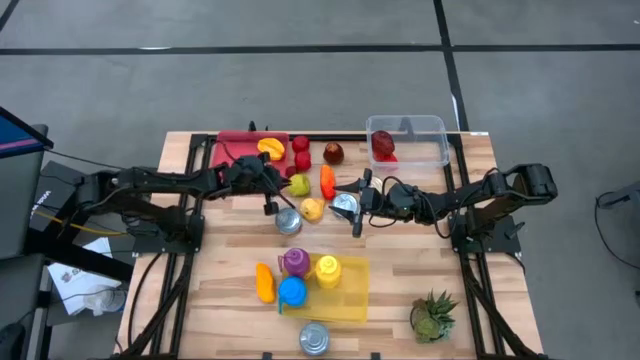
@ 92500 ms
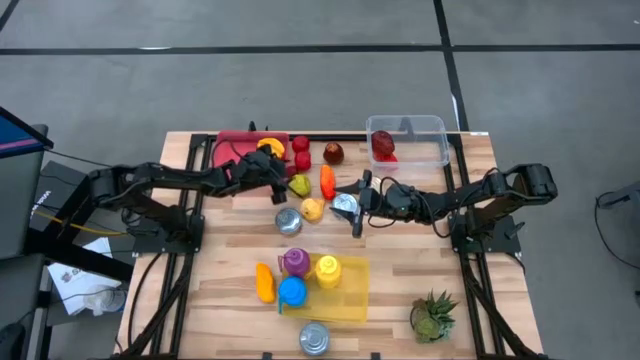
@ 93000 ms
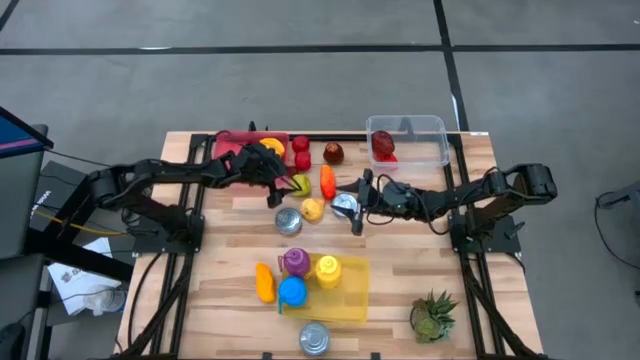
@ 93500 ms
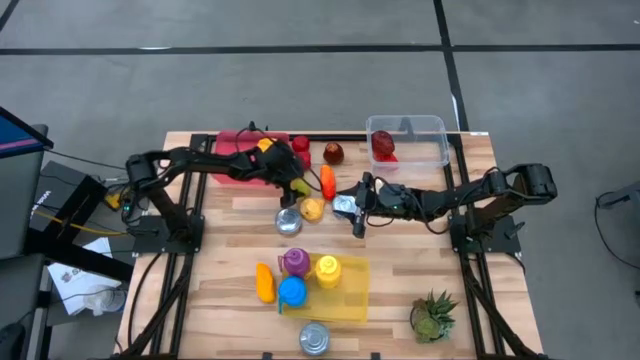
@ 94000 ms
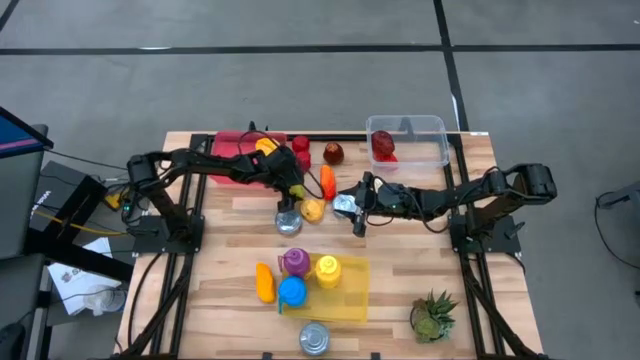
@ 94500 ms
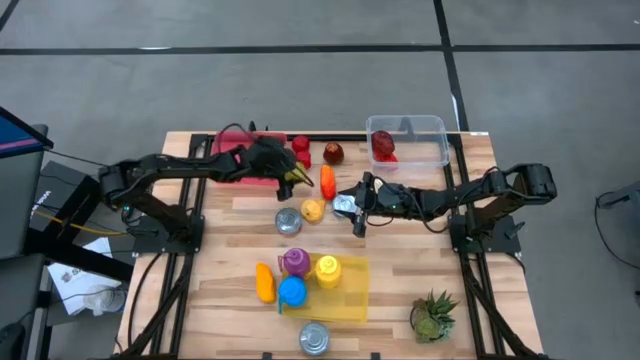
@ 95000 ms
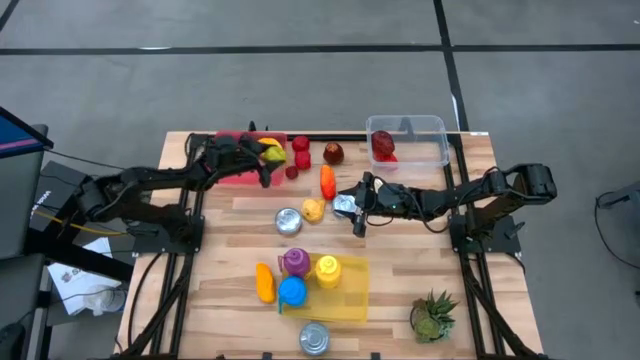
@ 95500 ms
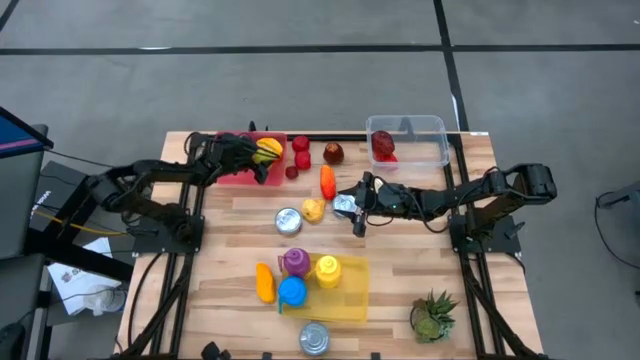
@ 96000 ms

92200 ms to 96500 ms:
Task: Pick & Place Food Item
Put the green apple into the red bin

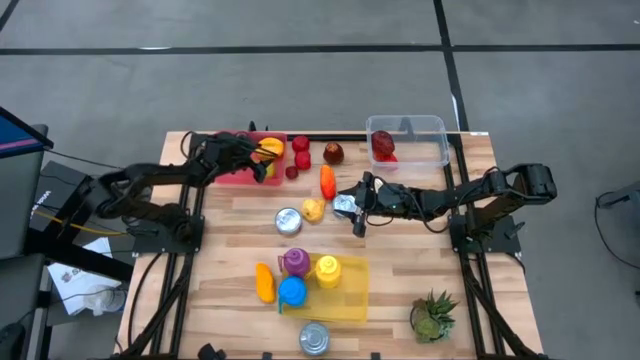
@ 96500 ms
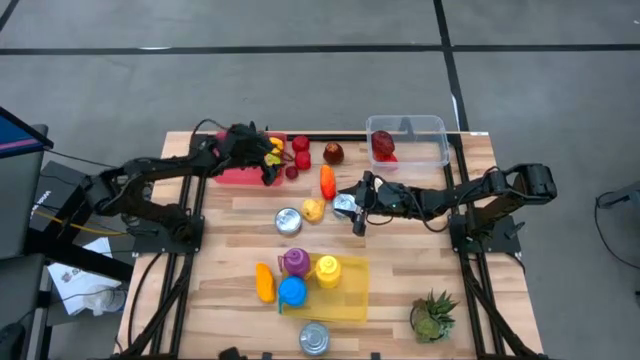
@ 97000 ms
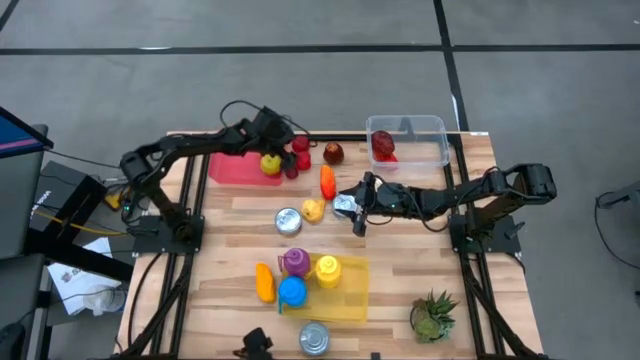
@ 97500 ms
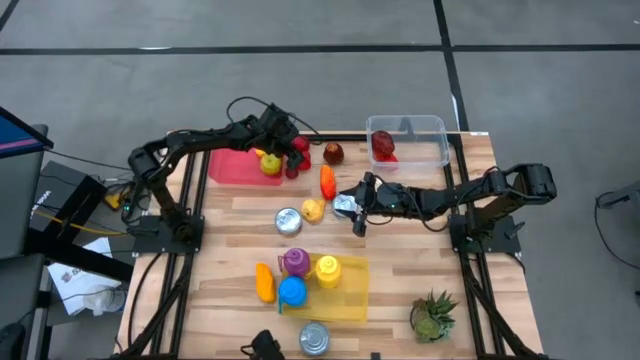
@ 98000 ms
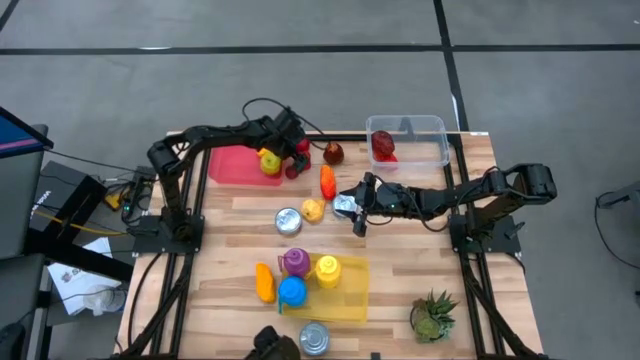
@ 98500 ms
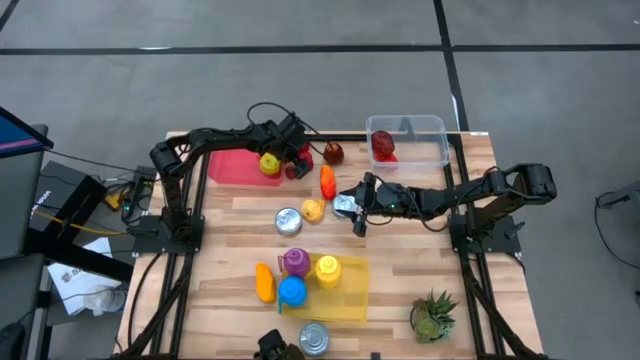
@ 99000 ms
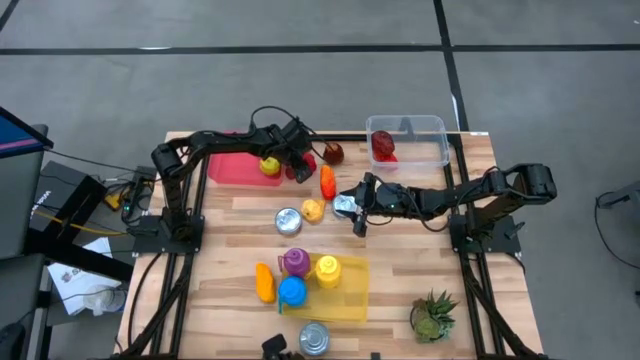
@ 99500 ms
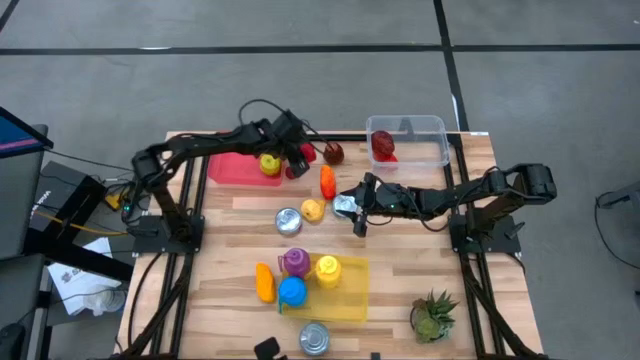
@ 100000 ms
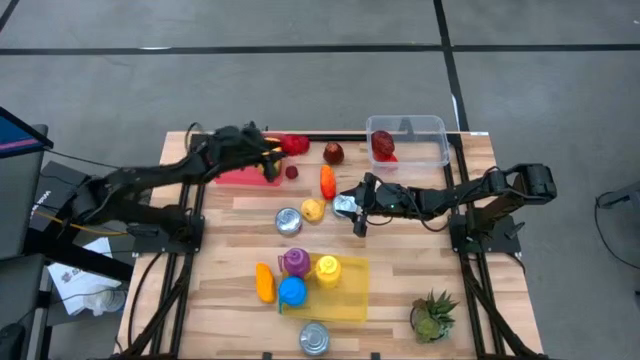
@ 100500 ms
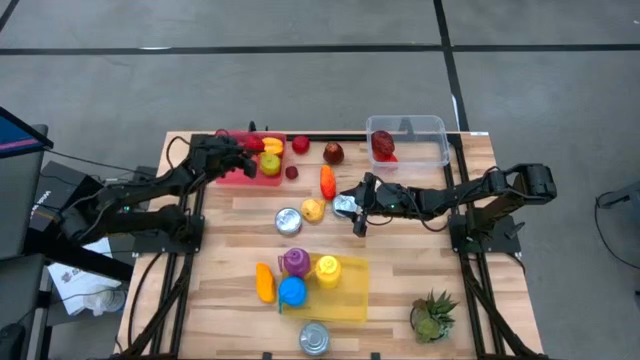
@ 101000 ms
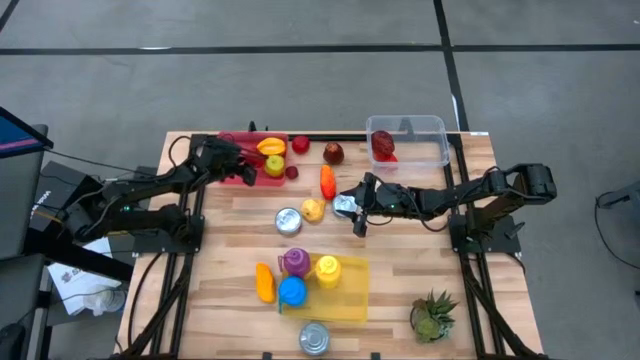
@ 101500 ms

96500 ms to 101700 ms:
Put the bottom red apple into the red bin

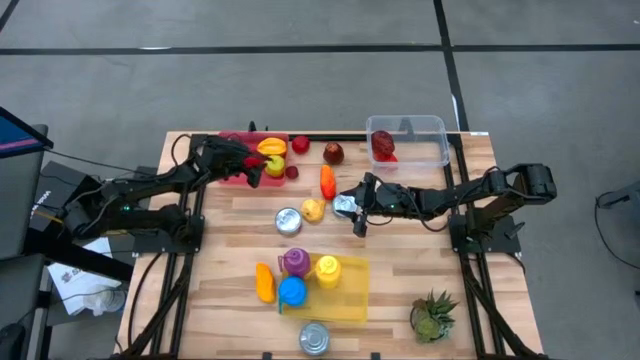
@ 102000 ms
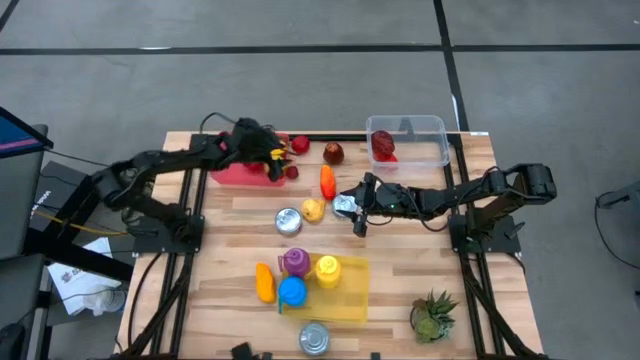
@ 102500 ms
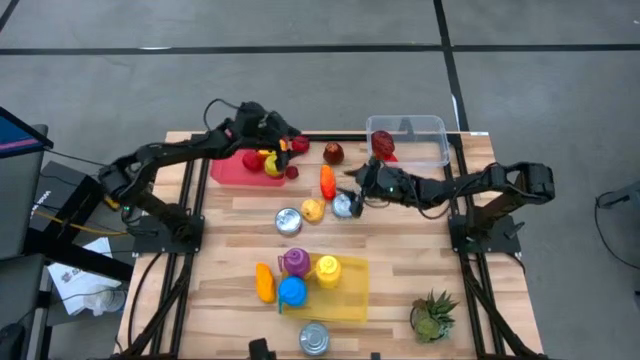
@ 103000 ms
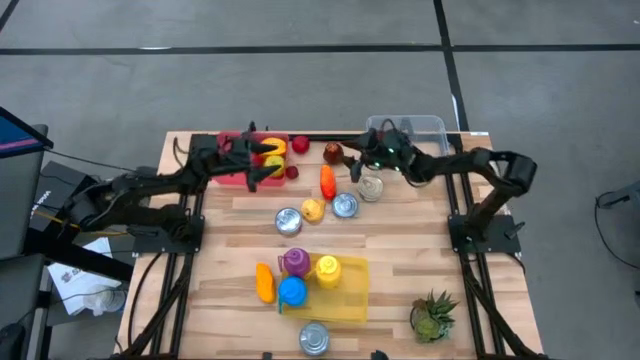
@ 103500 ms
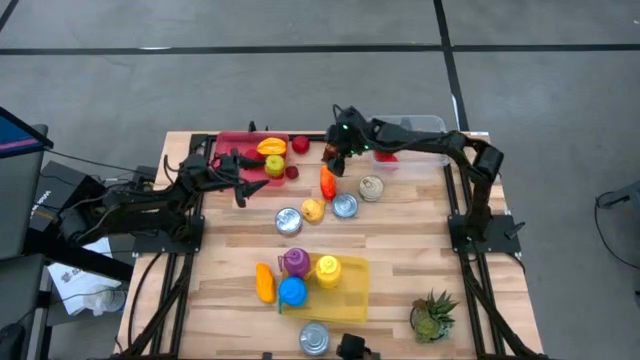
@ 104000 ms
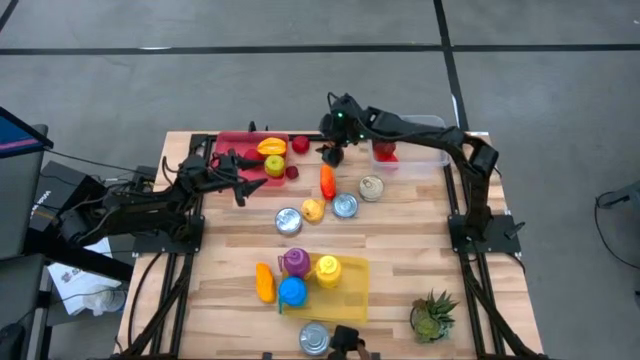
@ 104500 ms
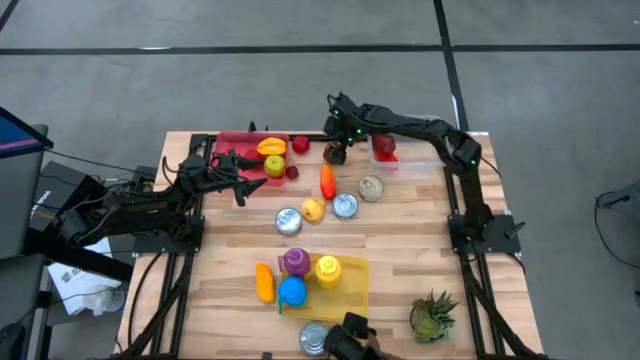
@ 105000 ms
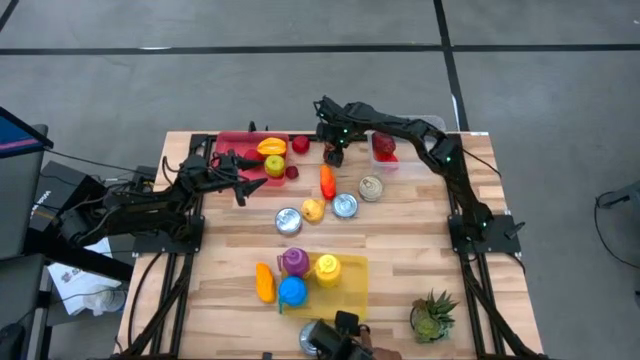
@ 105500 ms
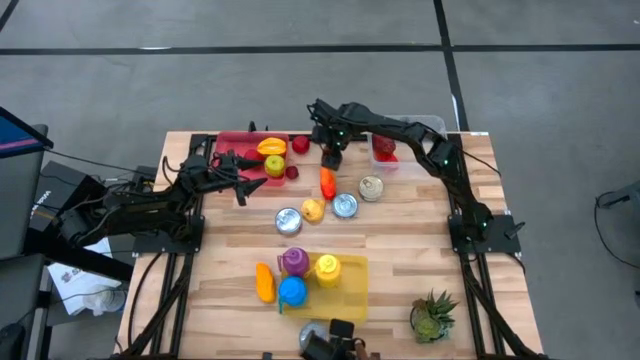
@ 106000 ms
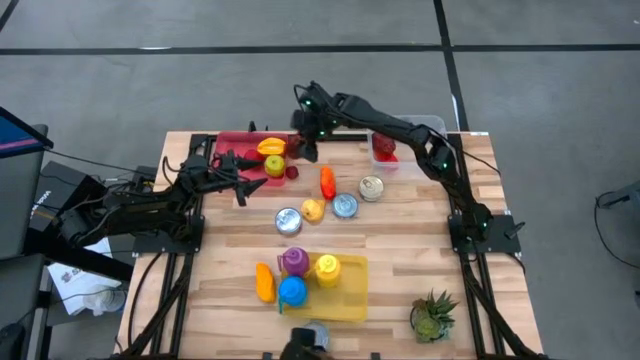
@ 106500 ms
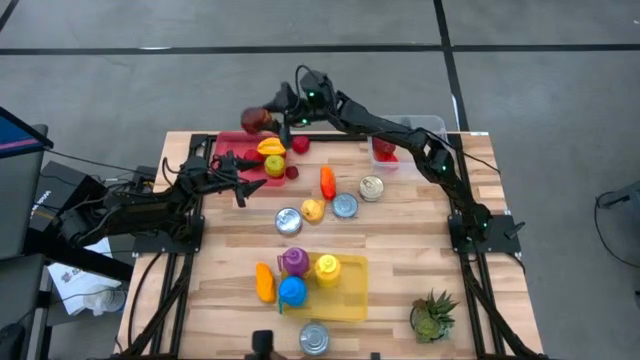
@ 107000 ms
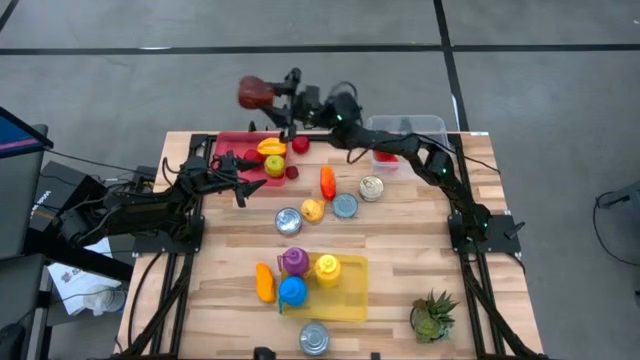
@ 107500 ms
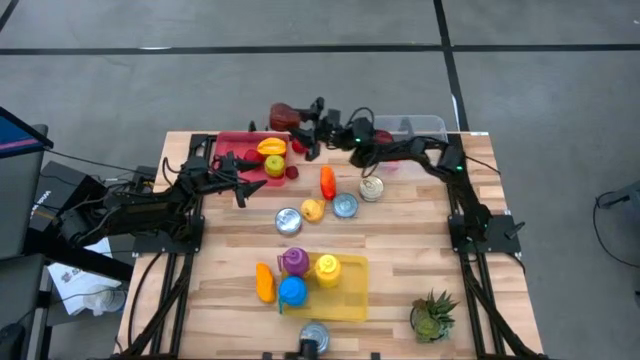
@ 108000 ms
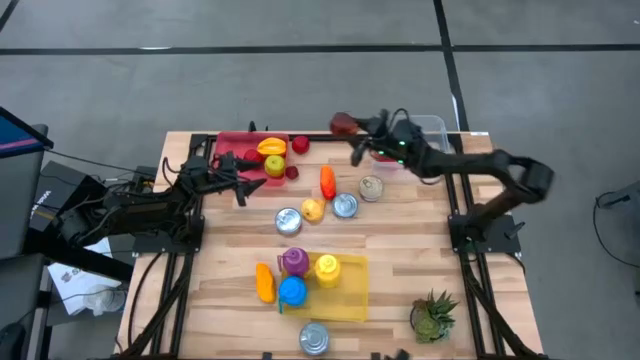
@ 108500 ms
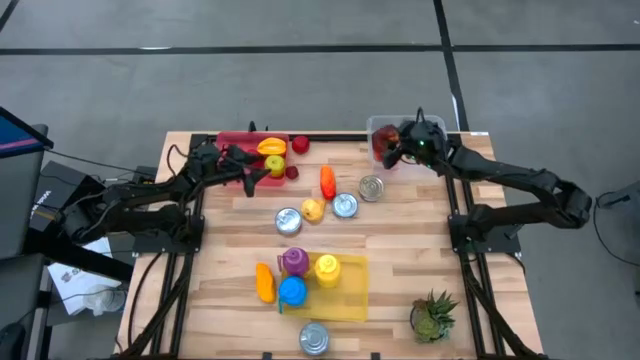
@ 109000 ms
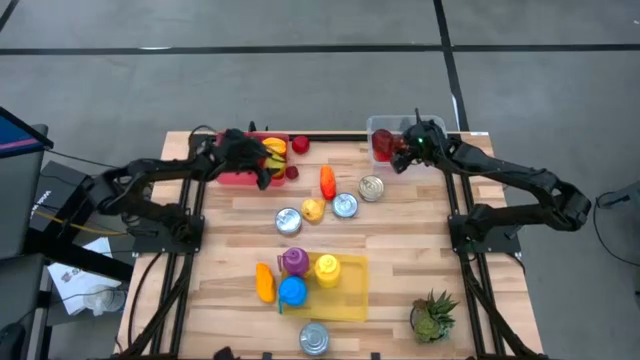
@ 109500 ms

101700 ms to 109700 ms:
Put the dark red apple into the transparent bin

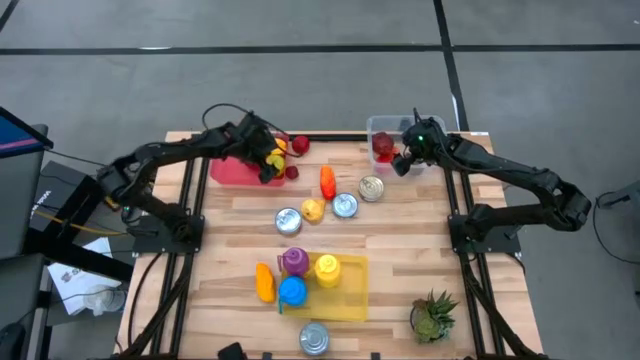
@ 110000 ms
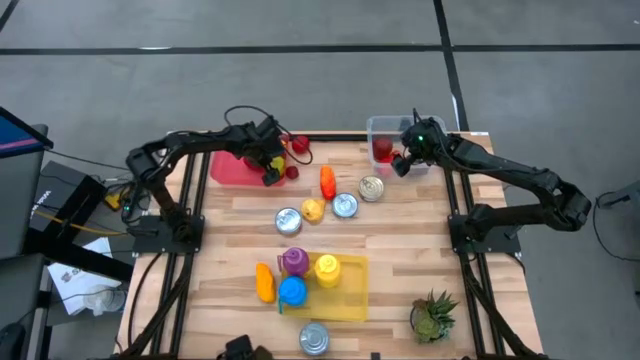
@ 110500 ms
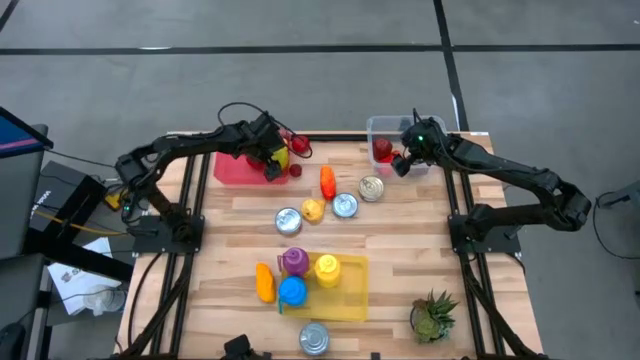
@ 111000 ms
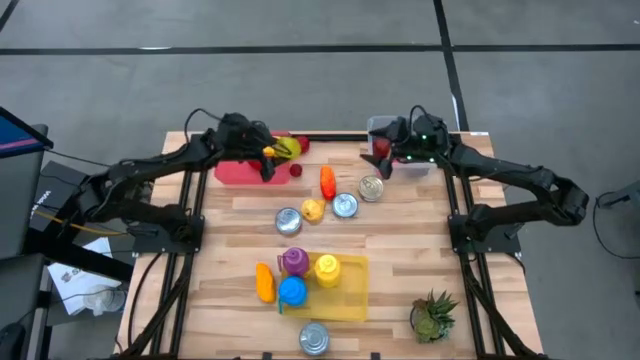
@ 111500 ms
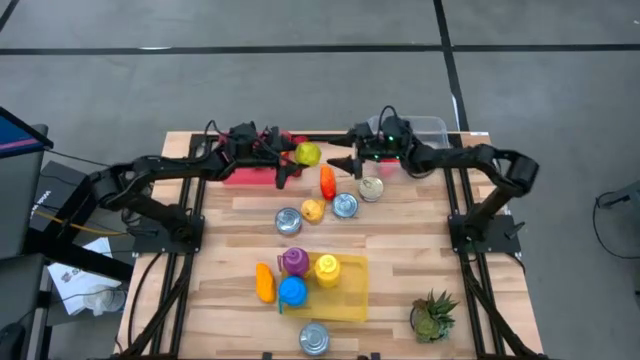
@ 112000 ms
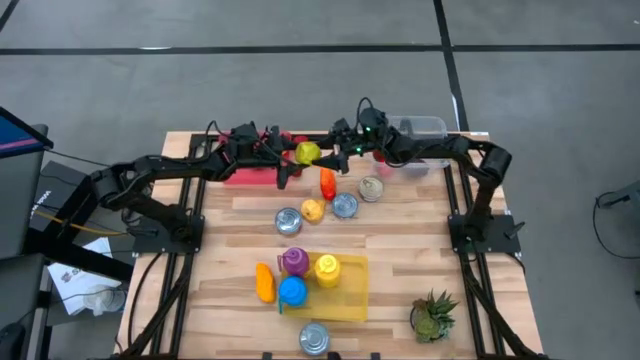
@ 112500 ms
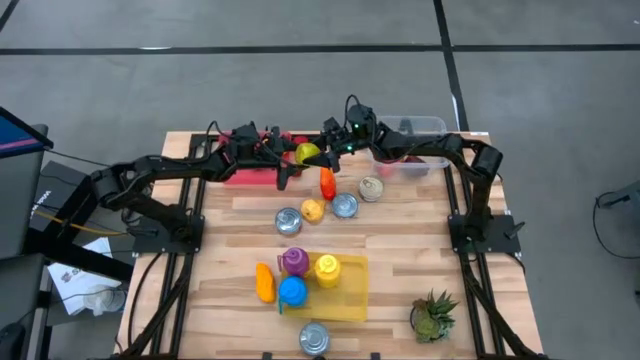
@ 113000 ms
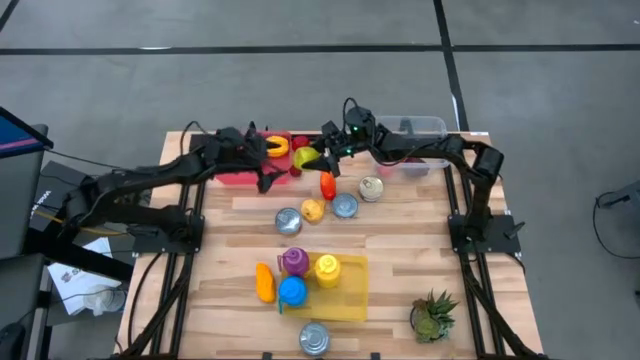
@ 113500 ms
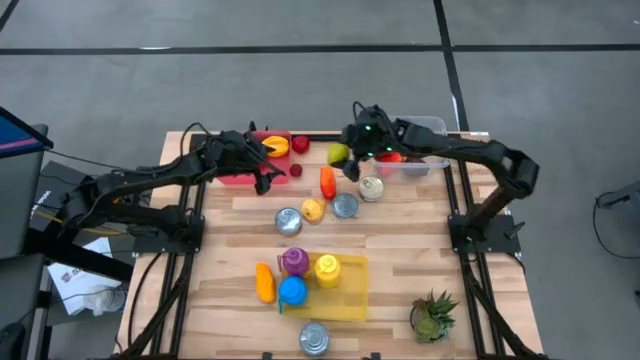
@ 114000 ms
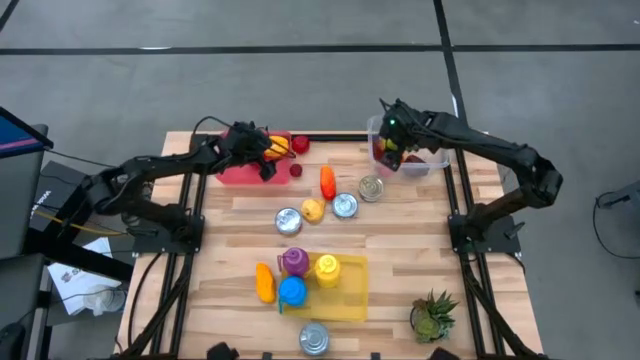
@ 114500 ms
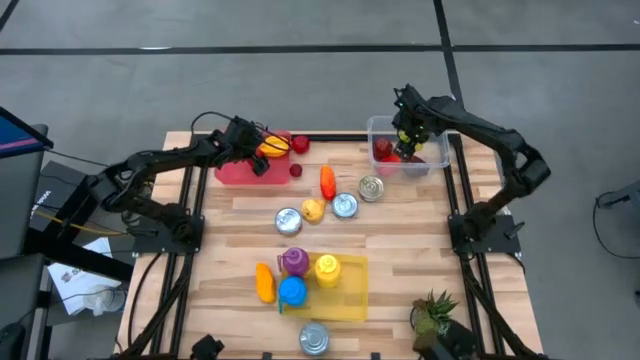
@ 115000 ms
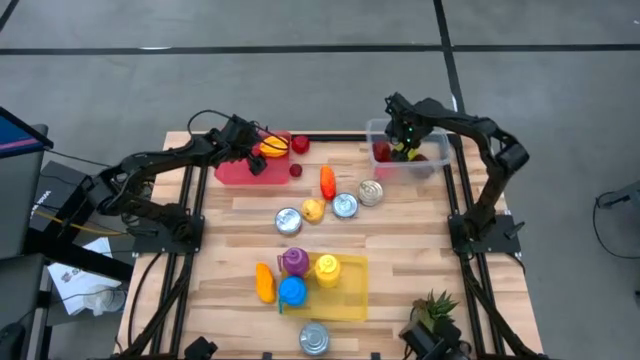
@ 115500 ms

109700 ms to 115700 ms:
Put the green apple from the red bin into the transparent bin
